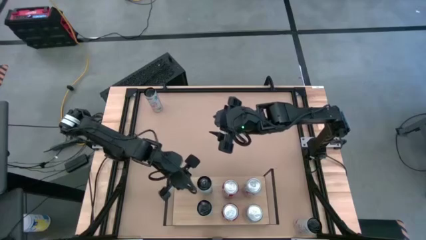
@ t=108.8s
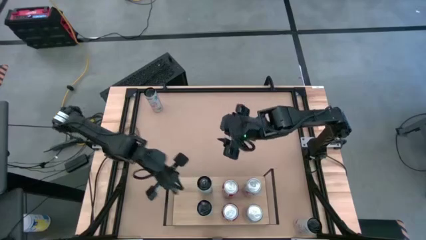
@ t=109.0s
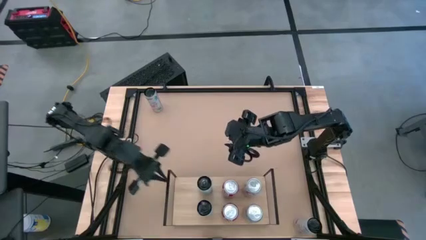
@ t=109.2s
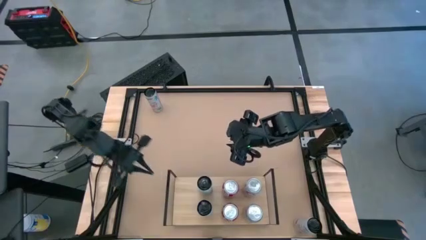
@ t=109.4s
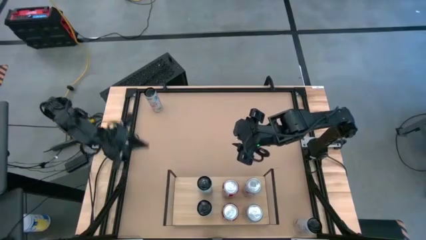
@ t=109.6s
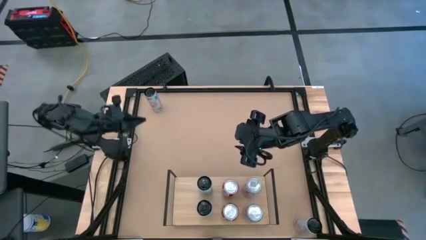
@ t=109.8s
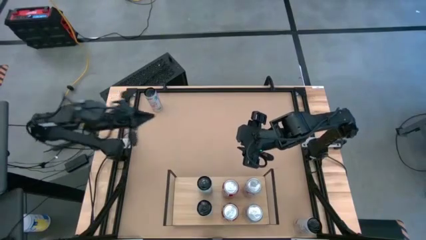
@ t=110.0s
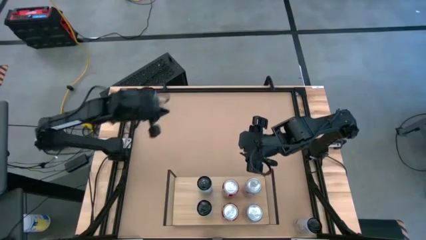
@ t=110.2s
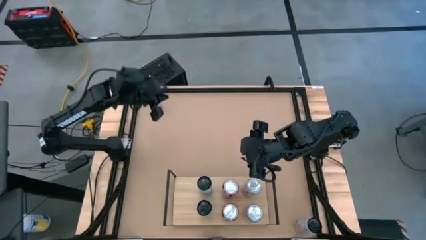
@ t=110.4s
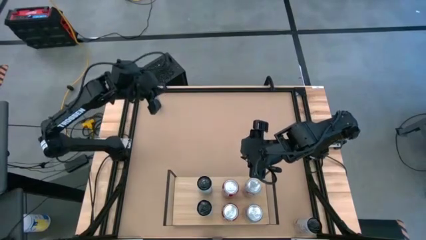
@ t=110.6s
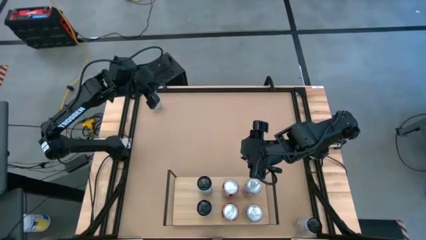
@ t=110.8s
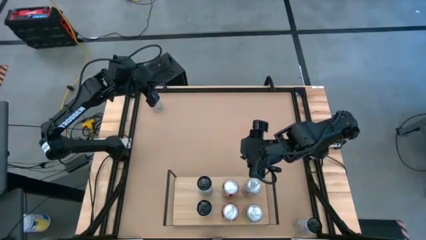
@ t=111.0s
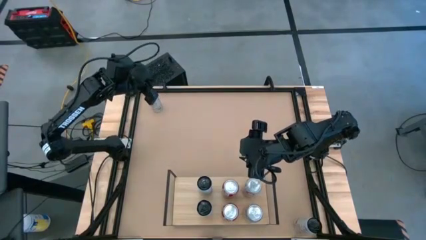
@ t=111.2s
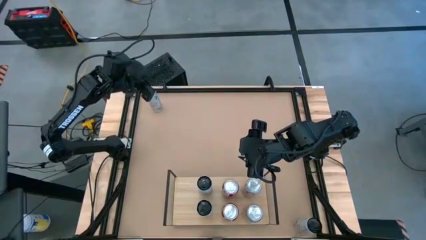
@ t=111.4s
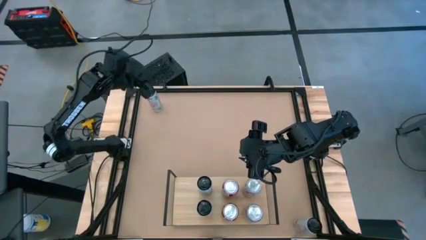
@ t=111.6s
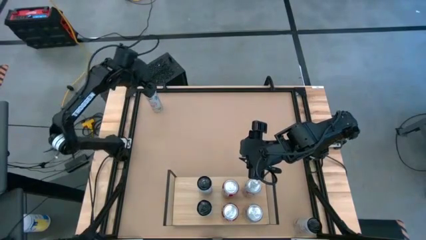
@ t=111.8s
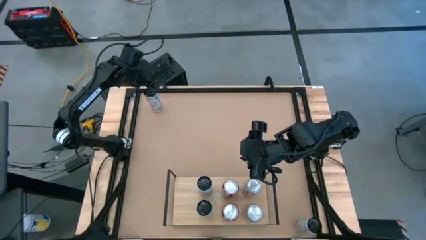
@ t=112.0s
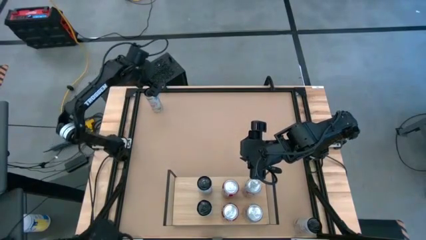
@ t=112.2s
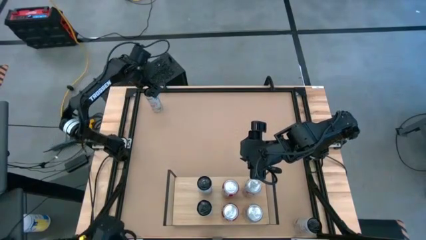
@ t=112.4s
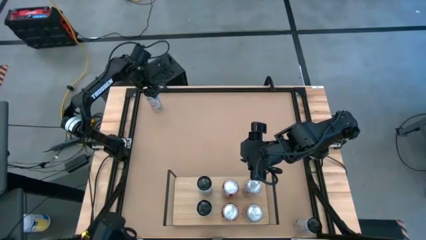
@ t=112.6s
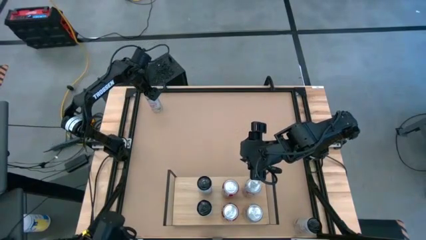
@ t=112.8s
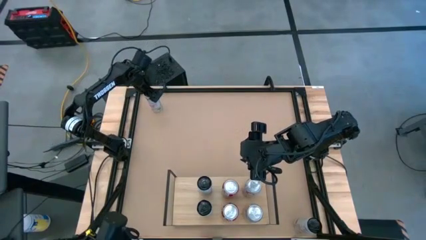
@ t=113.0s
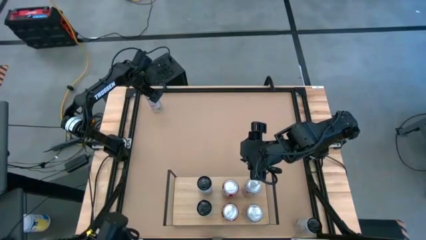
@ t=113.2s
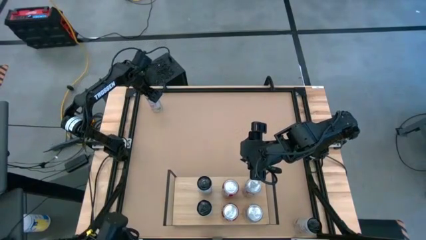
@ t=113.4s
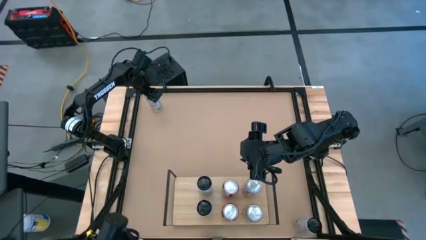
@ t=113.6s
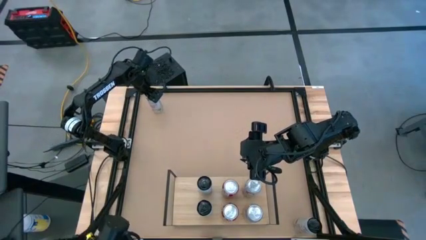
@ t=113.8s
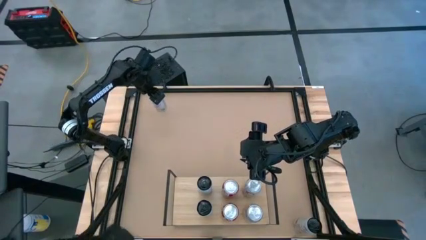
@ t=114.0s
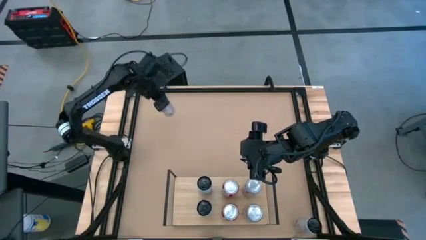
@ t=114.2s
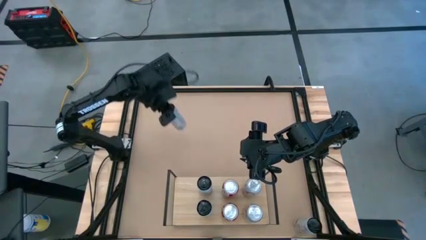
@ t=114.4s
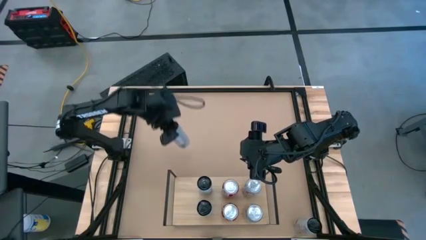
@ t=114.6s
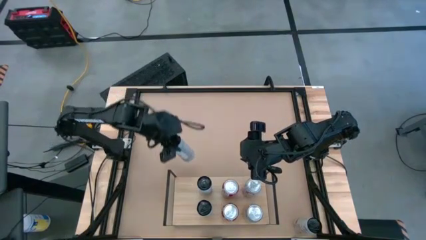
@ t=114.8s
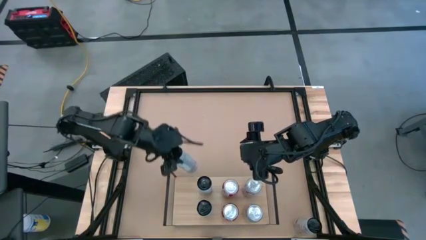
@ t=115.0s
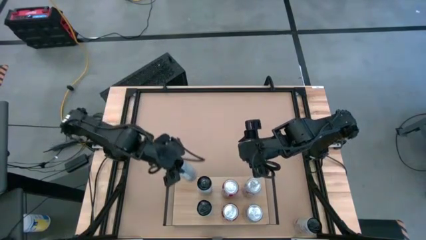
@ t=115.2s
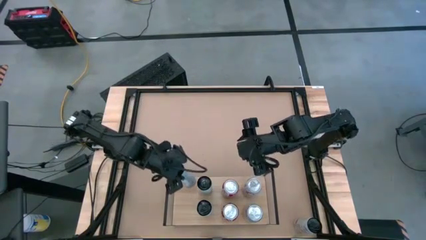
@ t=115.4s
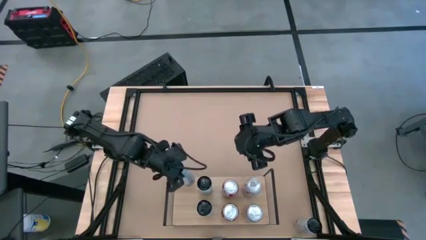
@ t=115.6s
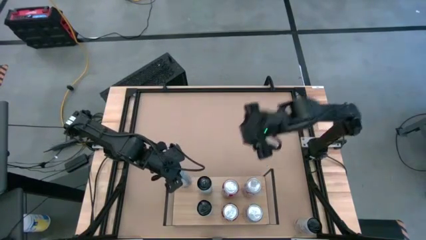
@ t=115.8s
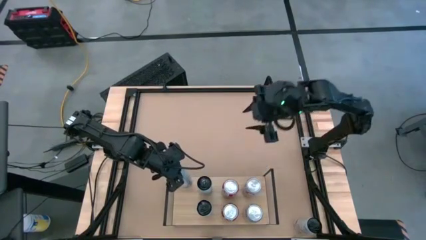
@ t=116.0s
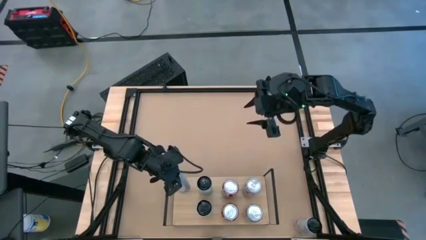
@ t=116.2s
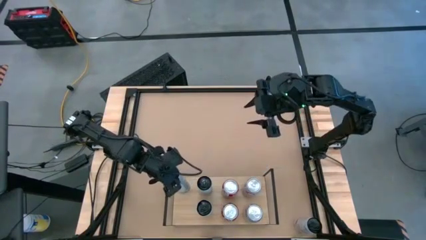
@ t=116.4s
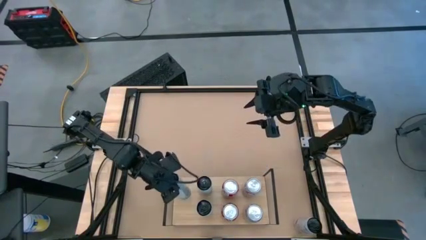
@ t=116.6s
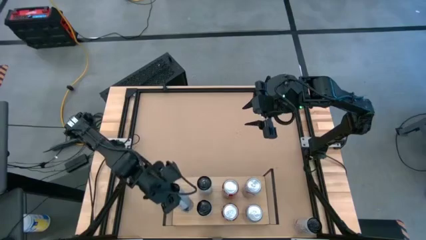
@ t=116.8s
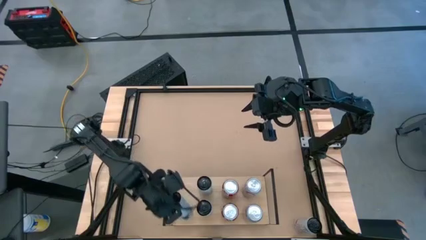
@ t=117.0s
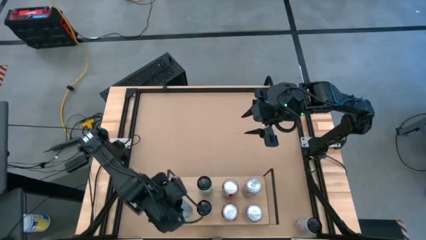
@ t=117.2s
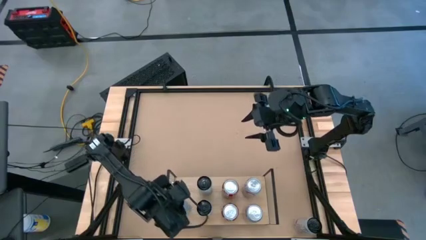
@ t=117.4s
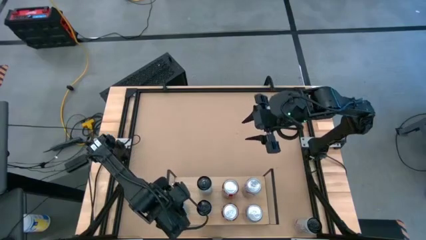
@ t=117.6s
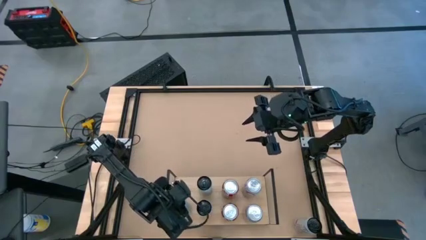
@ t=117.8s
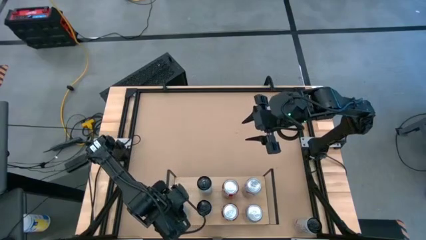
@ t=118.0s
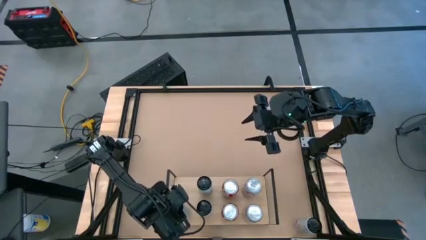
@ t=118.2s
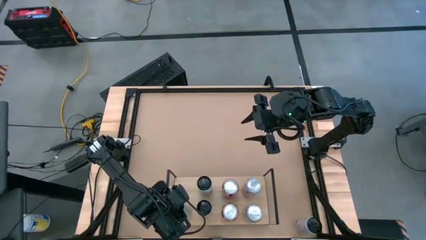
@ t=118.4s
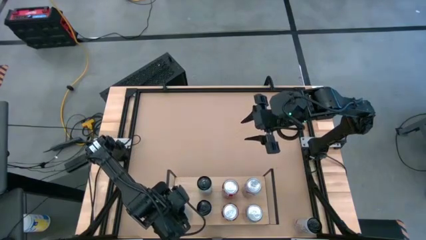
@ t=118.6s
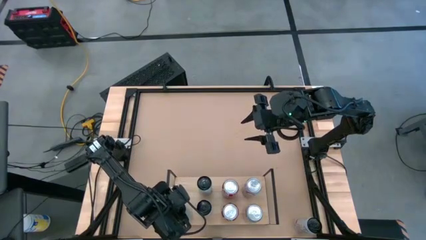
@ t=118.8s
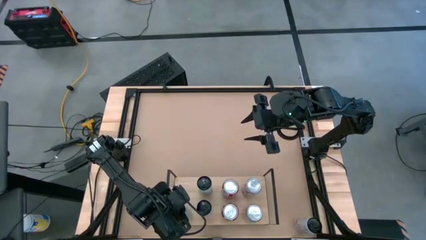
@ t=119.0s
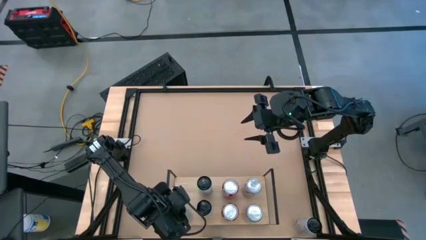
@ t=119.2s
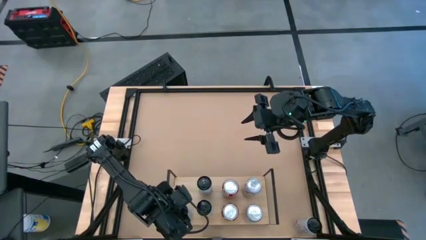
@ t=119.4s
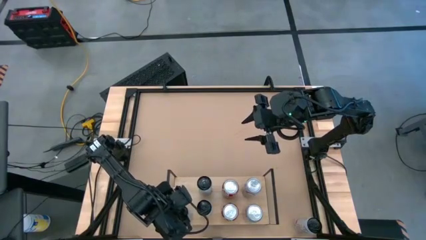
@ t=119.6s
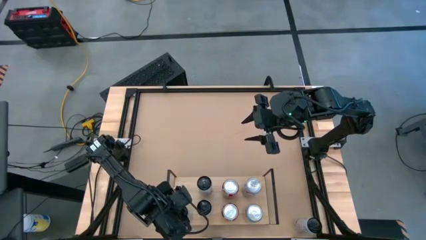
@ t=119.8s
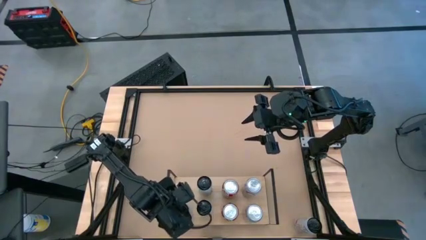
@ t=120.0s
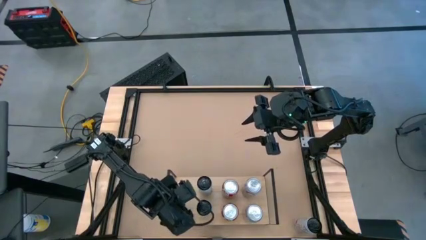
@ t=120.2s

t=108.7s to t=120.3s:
Task: Place canned beverage on shelf
Put the top white pink soda can on the shelf
